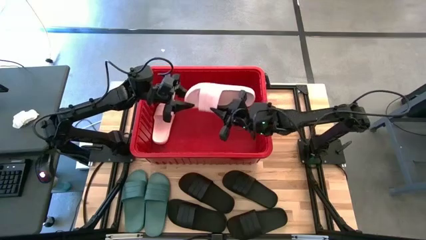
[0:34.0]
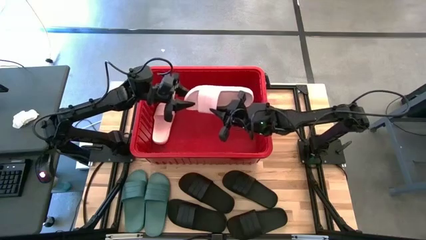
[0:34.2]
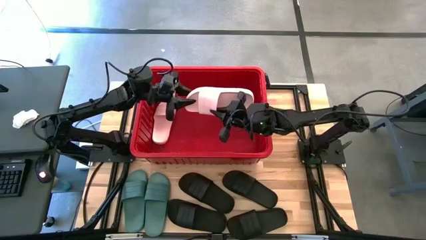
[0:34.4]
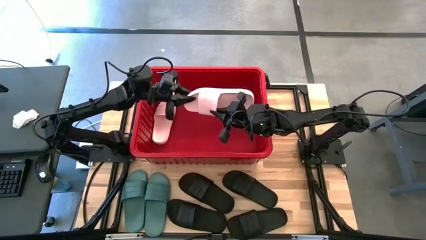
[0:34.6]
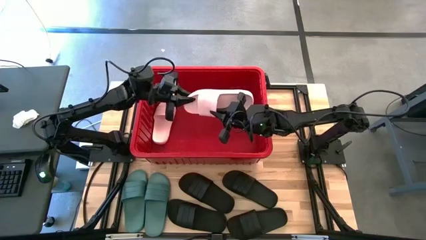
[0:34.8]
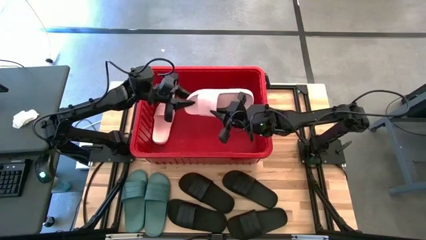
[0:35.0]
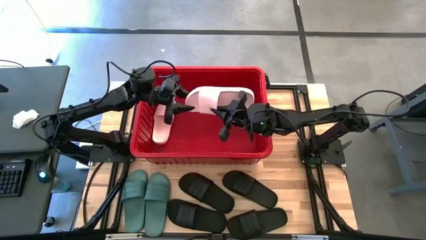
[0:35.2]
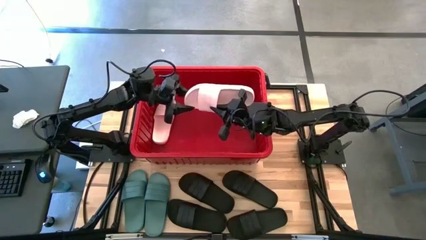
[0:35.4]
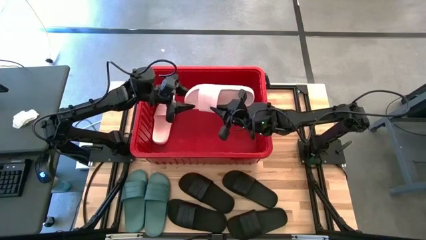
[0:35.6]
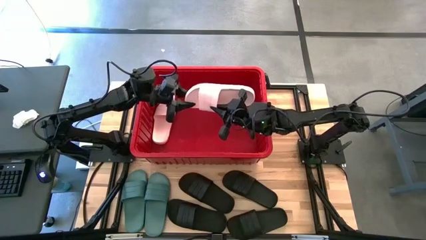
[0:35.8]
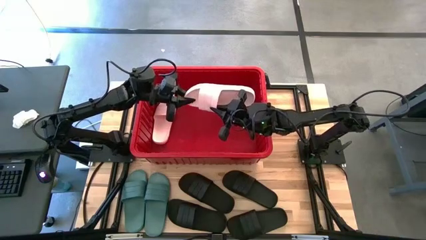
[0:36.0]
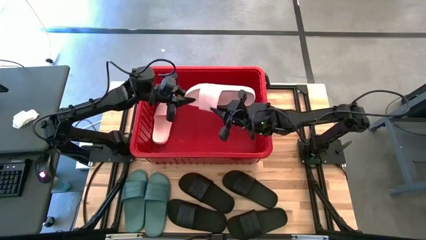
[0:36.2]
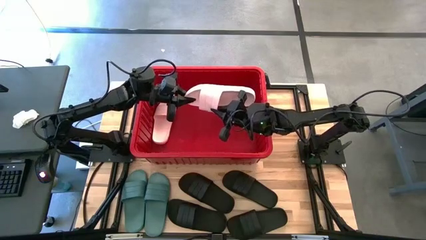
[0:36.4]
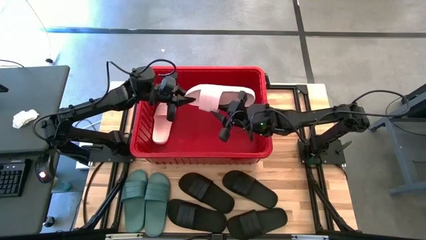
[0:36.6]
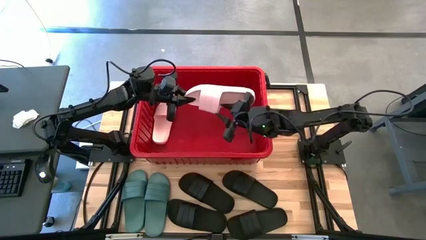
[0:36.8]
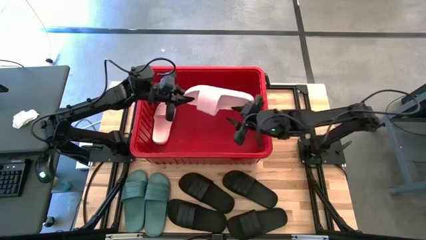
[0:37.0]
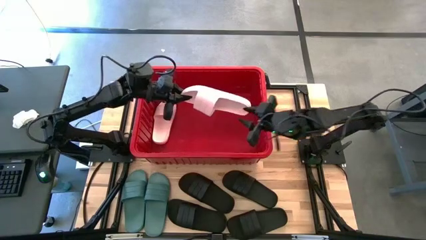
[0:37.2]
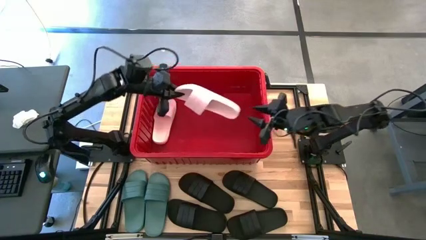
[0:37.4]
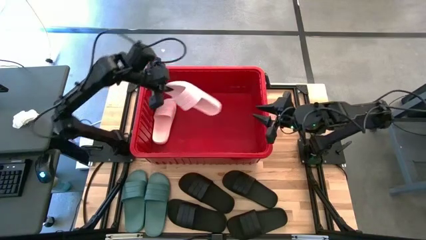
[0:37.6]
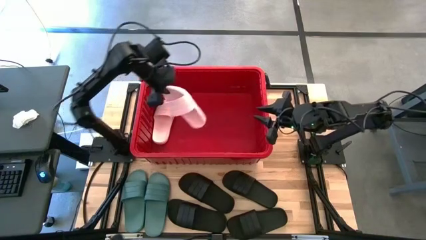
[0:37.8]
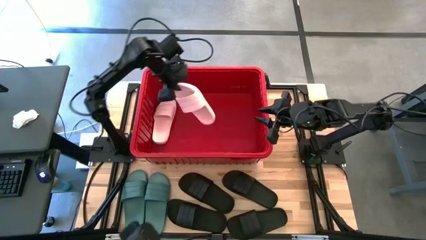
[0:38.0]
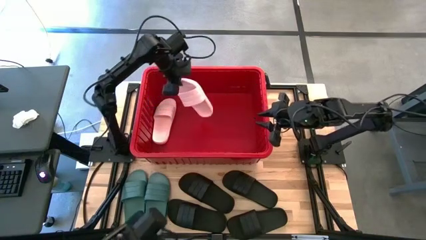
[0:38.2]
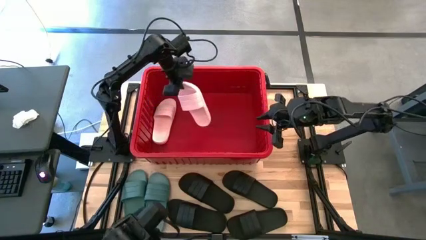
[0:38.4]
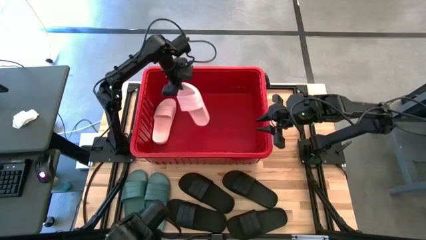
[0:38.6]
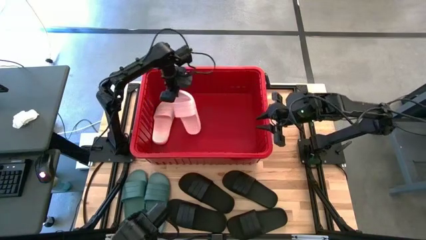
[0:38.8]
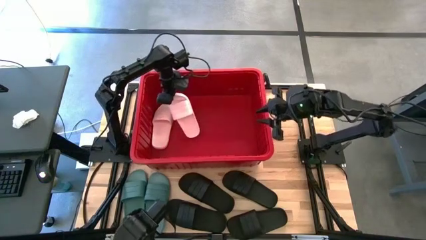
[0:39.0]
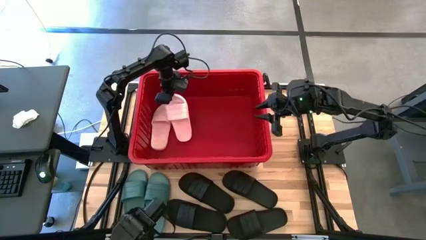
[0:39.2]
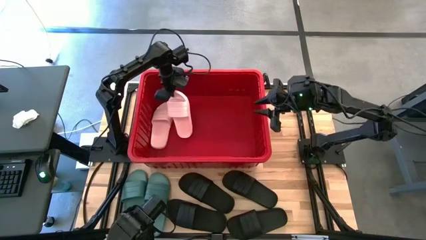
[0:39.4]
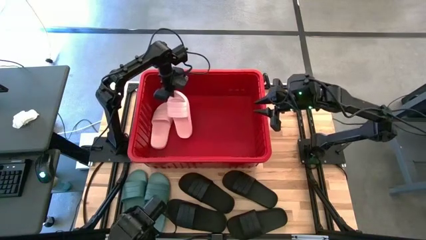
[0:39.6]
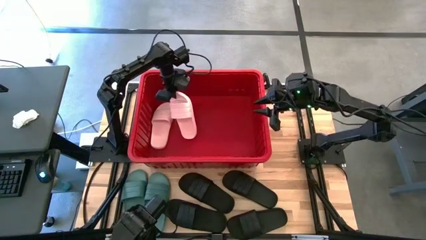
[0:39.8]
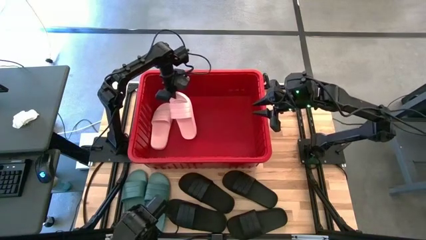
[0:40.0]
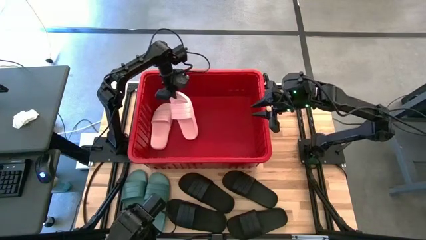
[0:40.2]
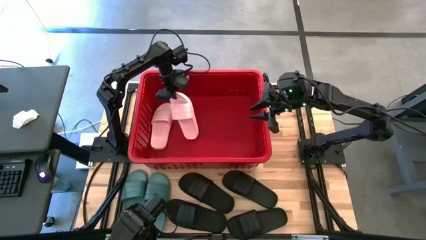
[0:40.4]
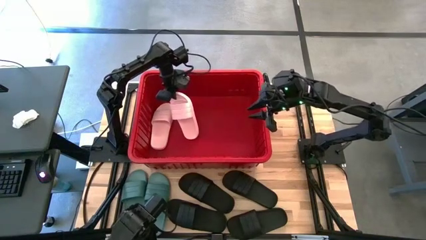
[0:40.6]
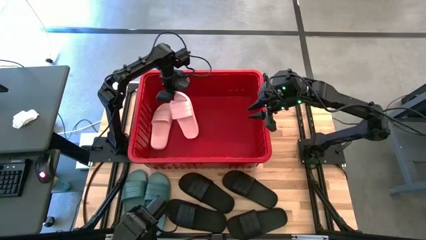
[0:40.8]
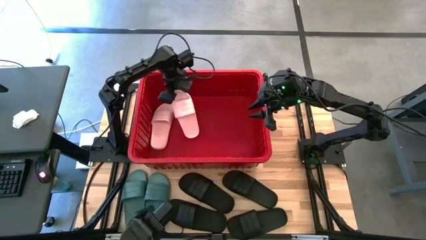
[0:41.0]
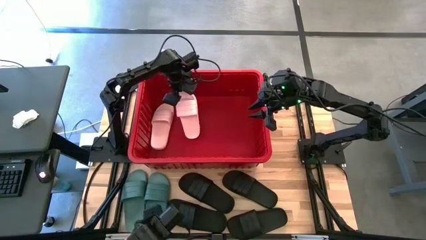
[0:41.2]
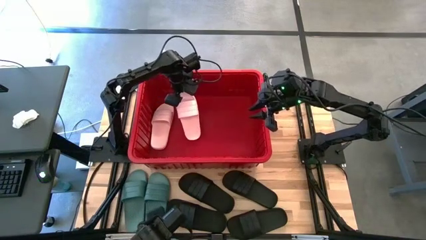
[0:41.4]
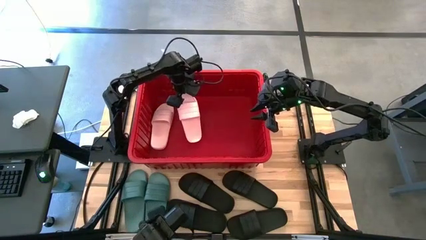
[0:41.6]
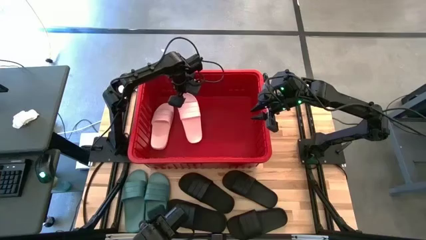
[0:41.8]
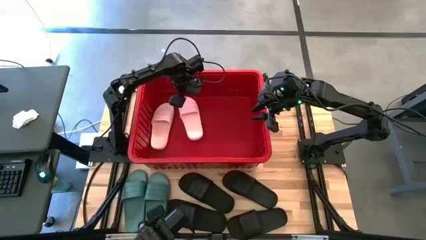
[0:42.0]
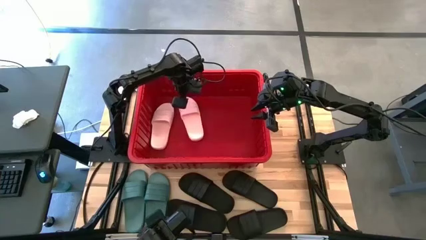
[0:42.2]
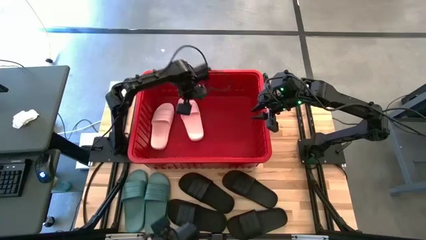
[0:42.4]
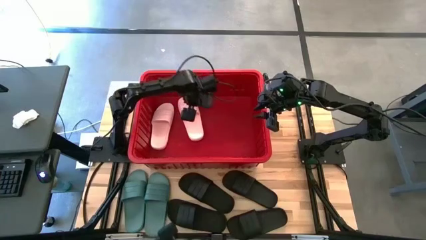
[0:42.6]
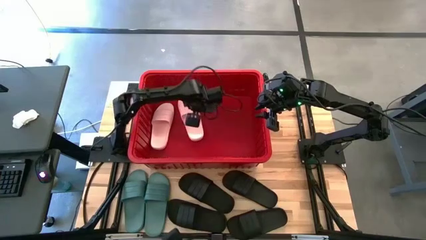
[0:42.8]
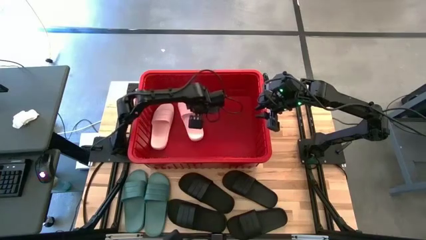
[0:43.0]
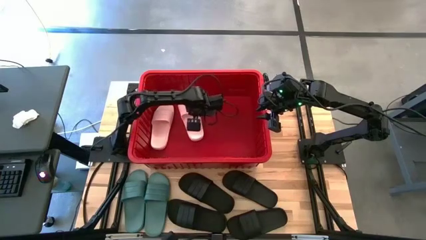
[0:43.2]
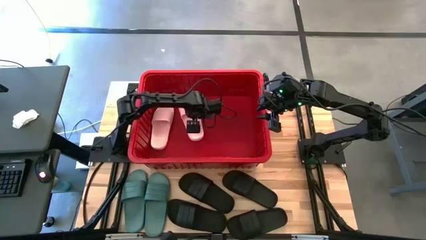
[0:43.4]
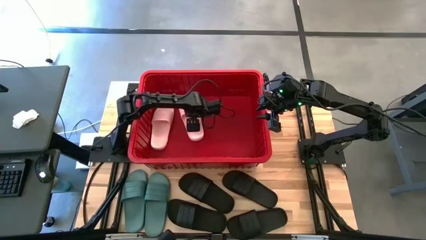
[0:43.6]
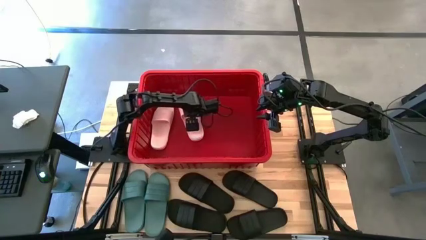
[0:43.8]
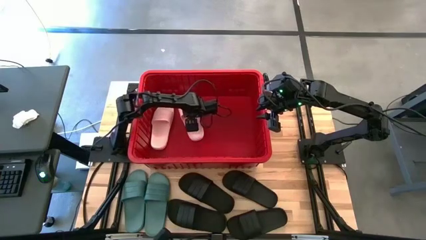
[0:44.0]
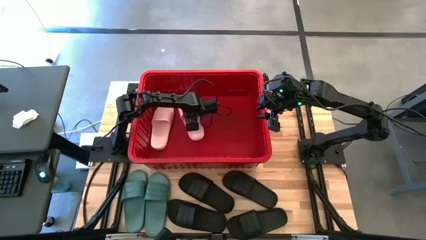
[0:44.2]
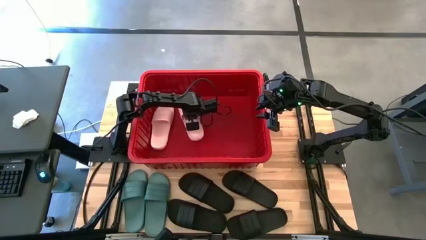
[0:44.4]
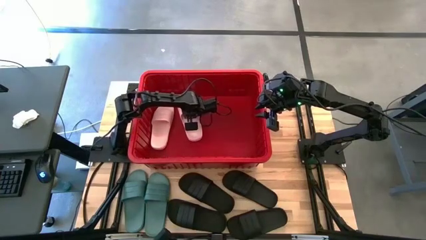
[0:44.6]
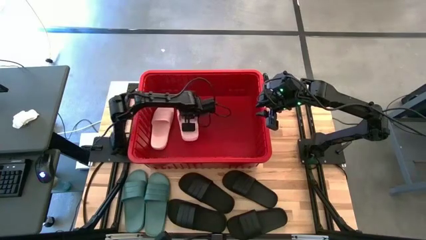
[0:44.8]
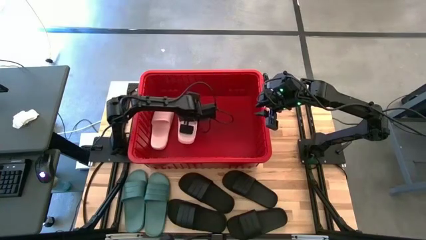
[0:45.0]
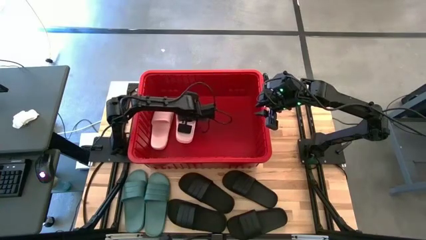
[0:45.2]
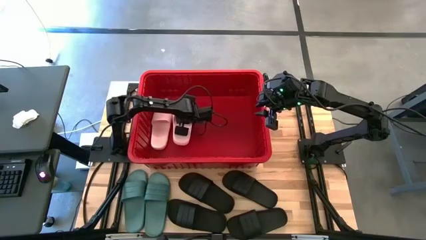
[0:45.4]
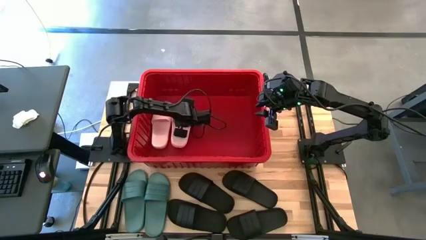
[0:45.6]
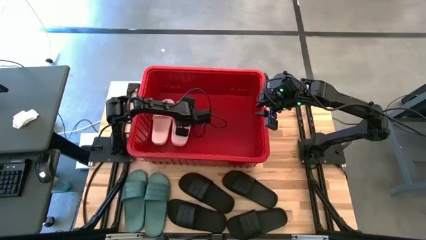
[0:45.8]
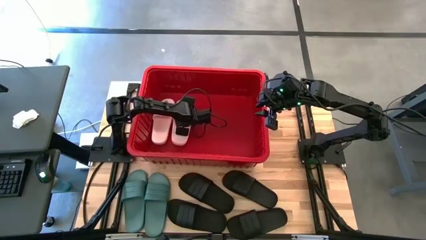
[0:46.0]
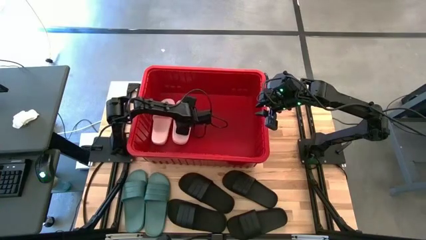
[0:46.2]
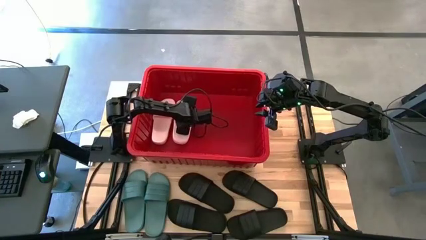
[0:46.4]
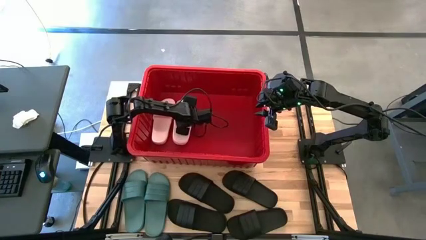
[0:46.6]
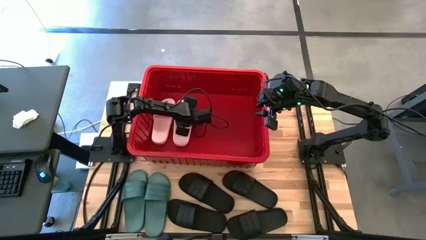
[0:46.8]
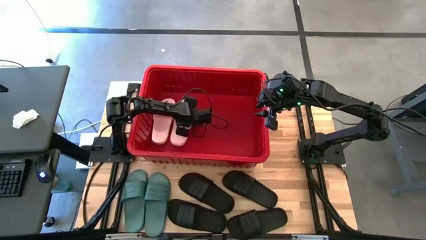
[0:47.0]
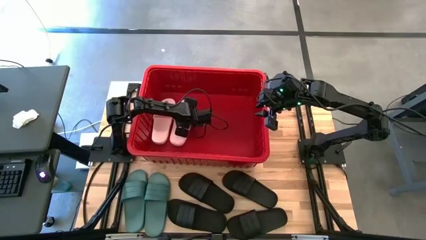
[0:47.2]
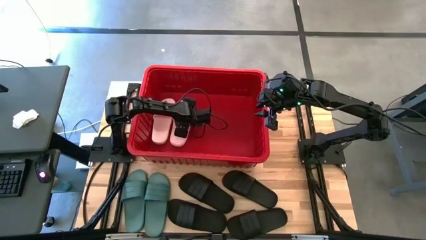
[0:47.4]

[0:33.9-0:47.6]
Task: Pick and place slides into bin
Put the pink slide into the red bin

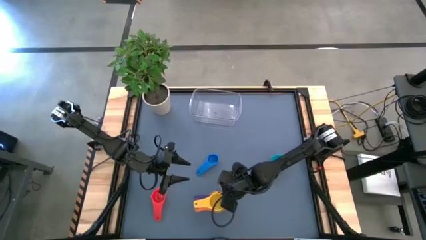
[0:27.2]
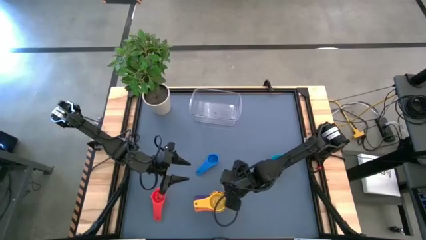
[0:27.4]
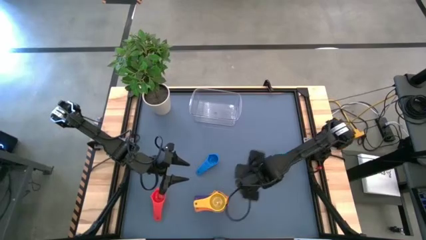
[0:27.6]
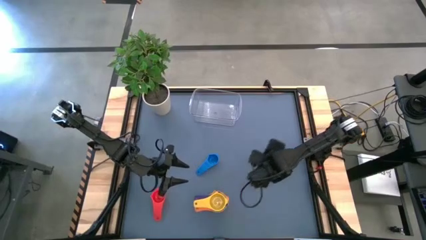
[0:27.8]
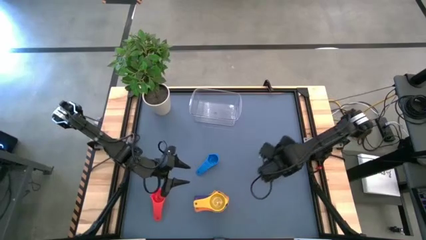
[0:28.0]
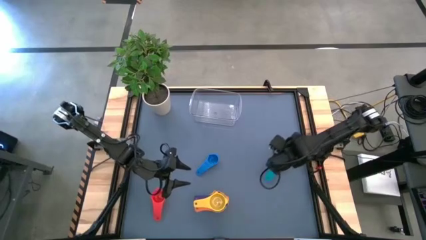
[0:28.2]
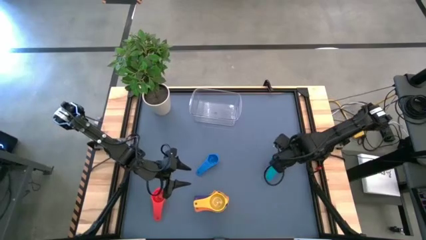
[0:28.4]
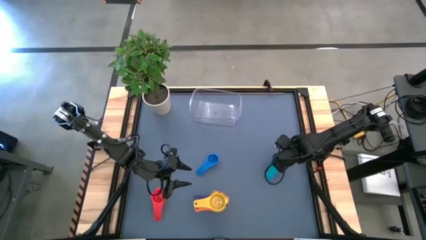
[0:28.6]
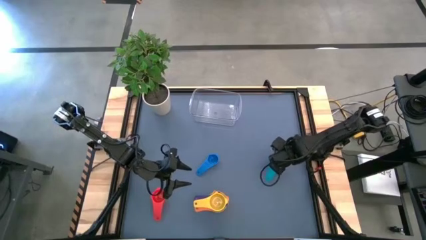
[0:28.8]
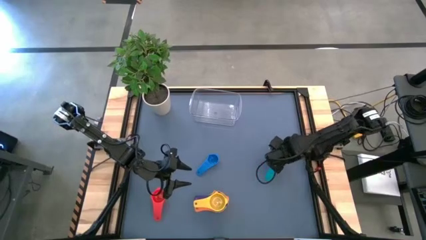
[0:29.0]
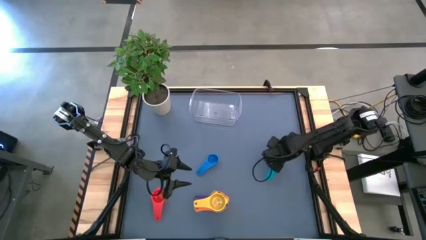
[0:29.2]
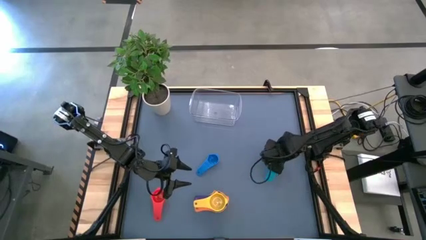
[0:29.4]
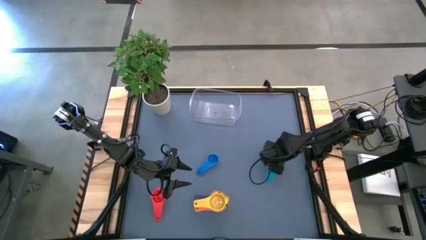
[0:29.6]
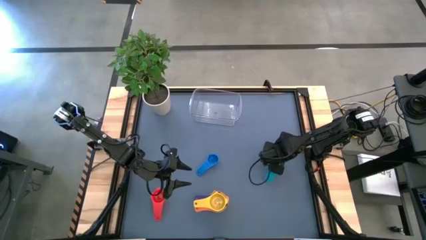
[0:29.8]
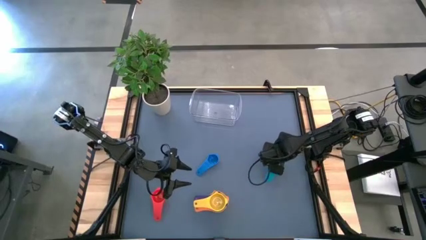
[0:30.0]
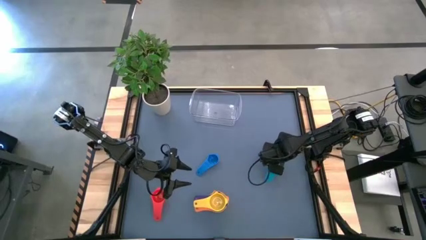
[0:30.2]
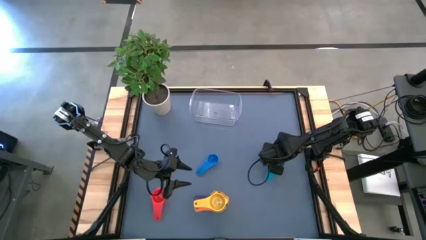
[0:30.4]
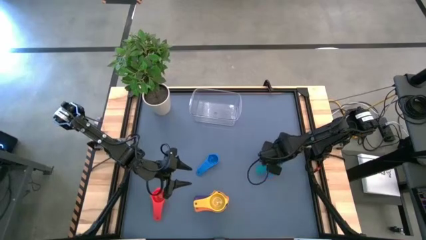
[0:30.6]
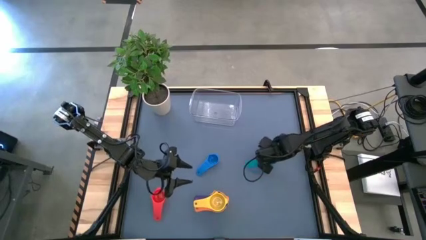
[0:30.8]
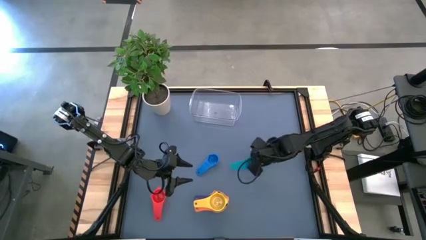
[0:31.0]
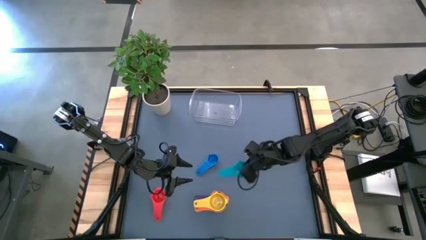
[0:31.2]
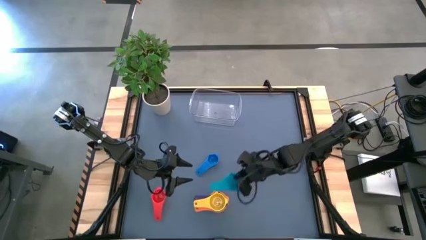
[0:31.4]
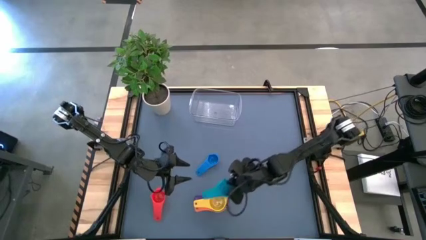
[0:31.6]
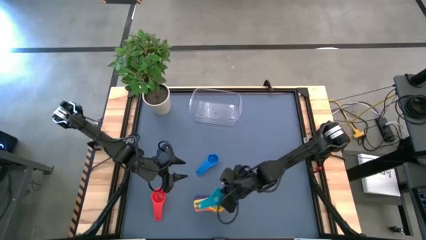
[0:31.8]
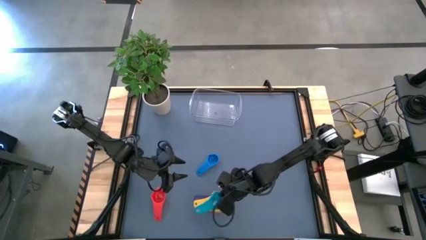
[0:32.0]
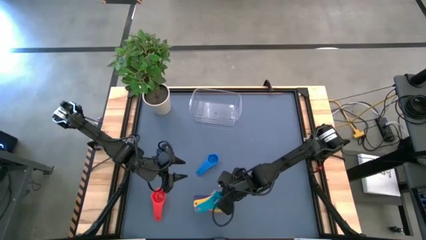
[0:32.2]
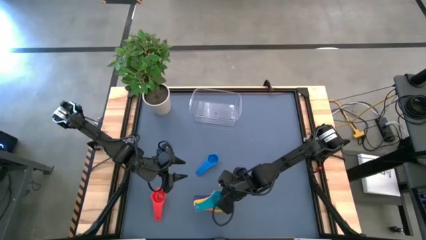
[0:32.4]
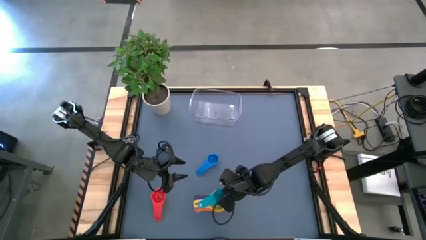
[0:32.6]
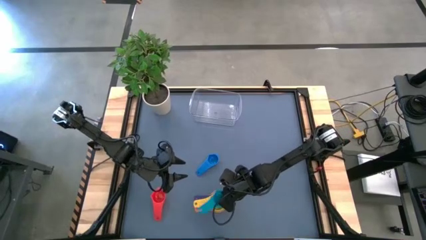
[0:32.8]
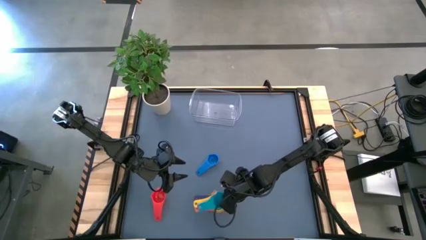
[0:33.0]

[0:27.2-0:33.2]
Task: Nest measuring cups in basket
Stack the light blue measuring cup on top of the yellow measuring cup
